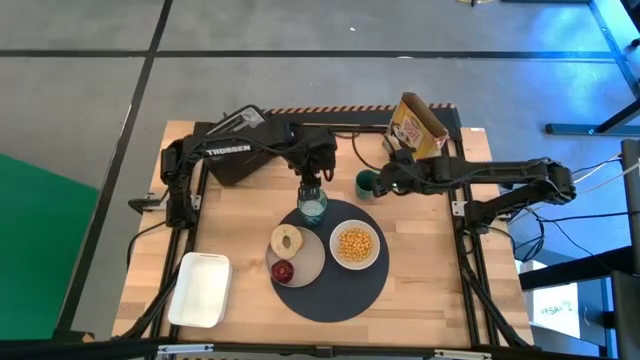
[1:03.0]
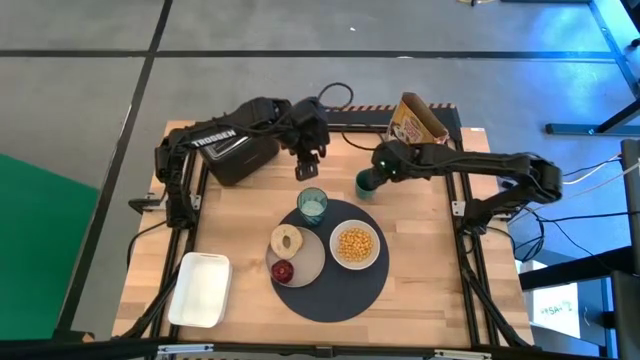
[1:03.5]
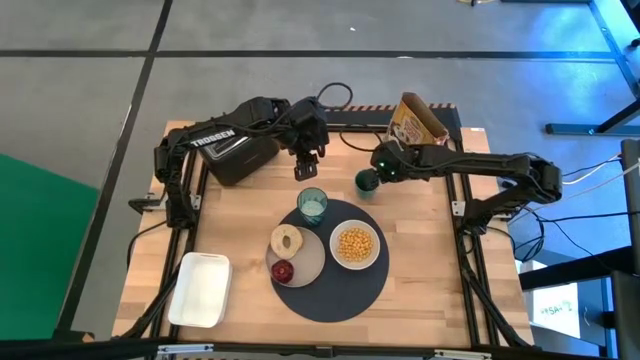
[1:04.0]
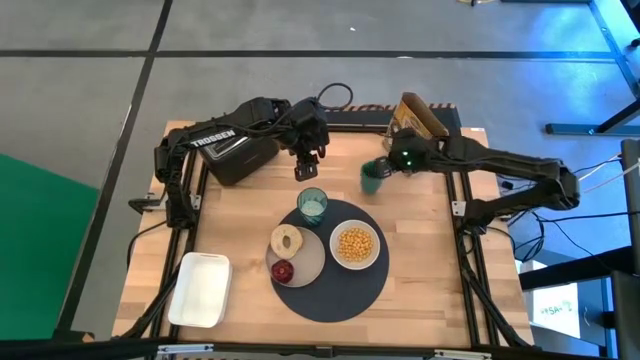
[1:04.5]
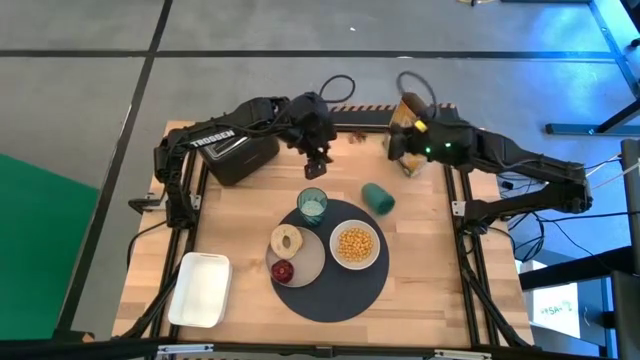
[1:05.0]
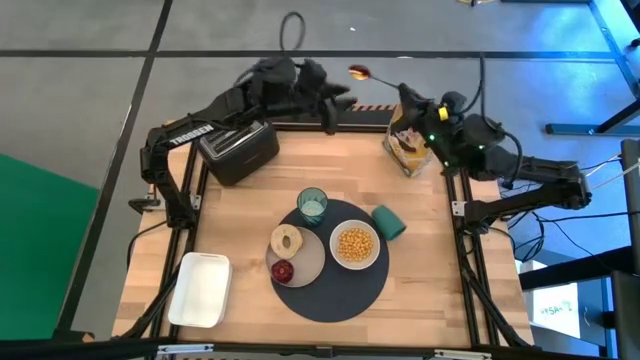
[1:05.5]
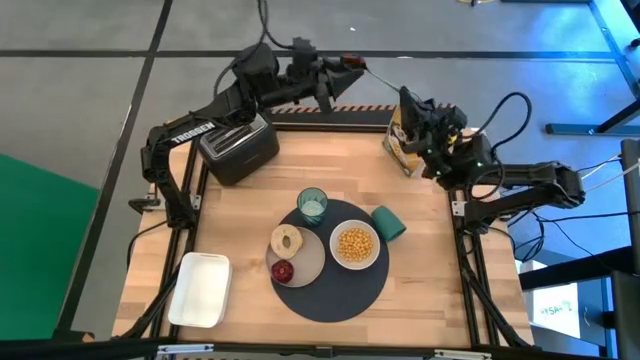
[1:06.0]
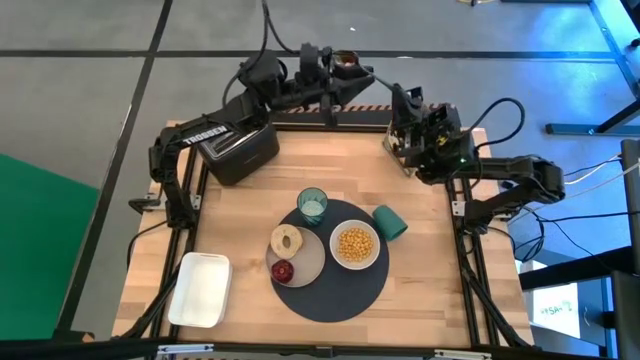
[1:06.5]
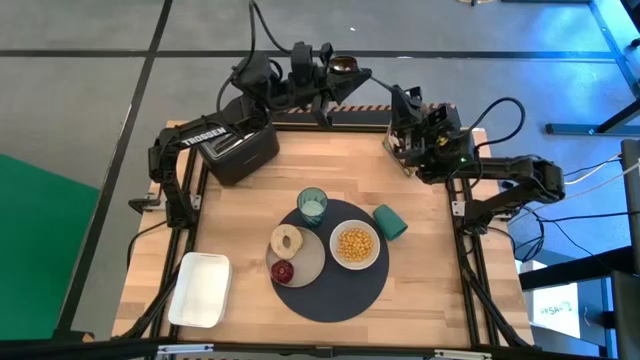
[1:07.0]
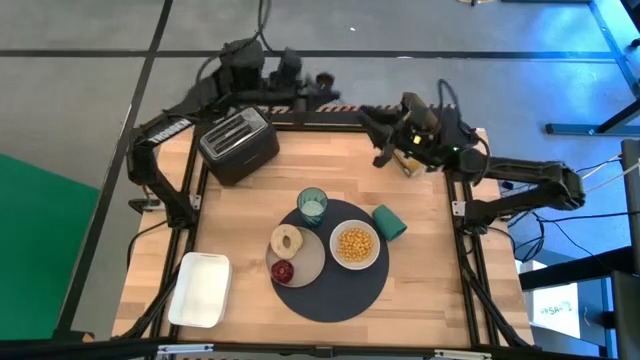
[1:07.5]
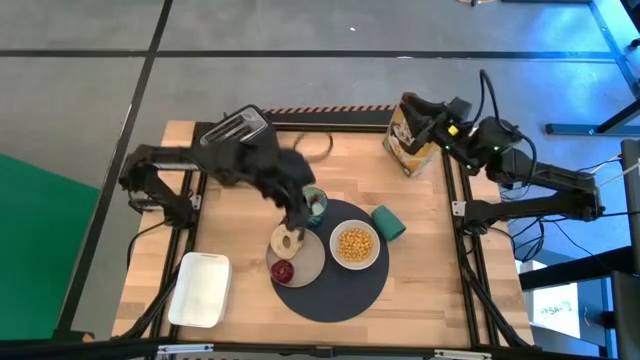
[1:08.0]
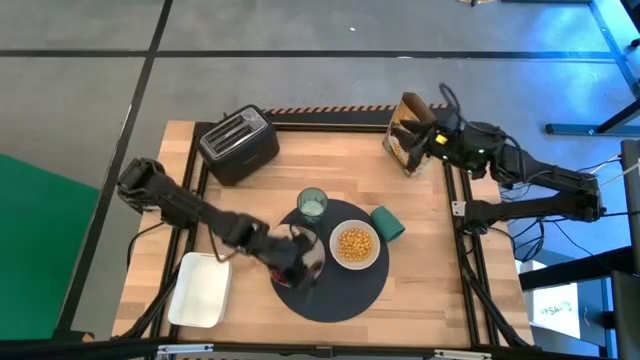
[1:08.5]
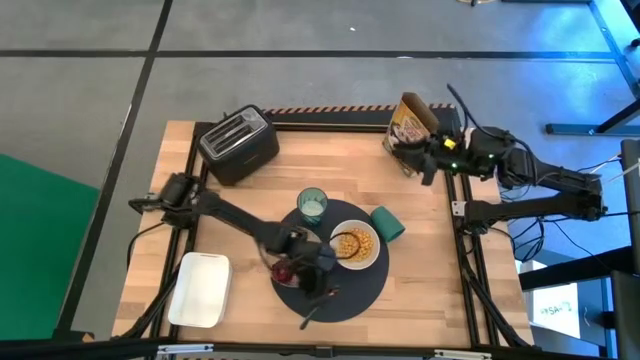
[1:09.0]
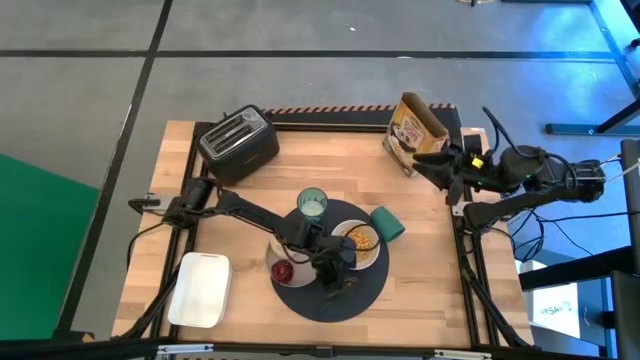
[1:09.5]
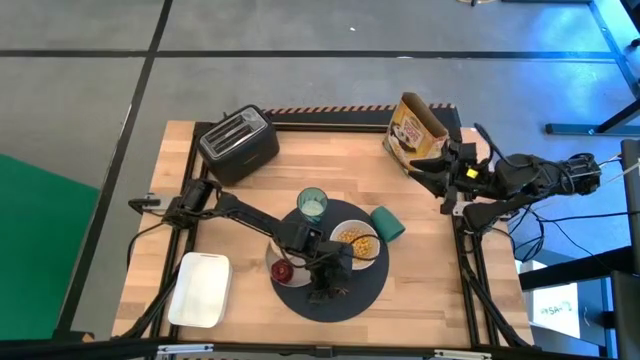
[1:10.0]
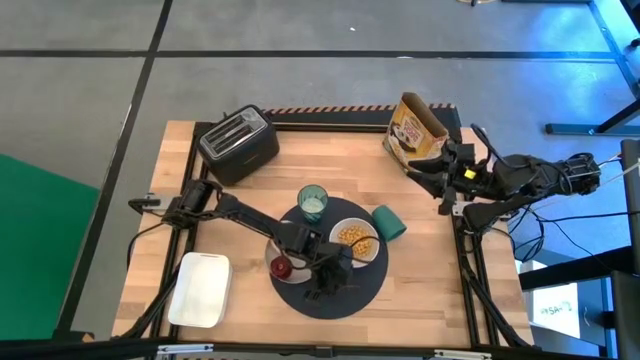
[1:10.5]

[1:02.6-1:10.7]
Task: Arrange a breakfast setting
Put the blue spoon from the blue cup on the dark blue table mat below the white bowl

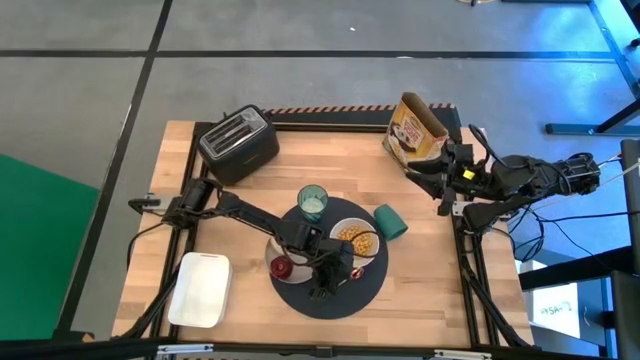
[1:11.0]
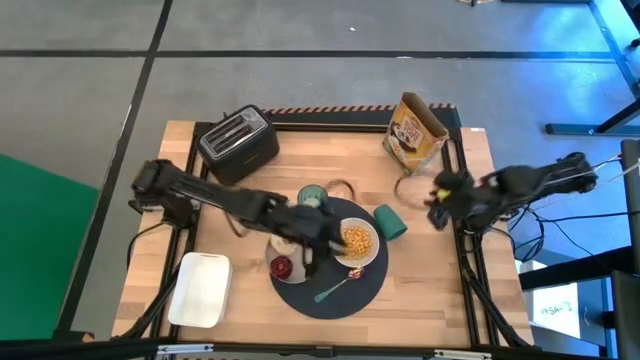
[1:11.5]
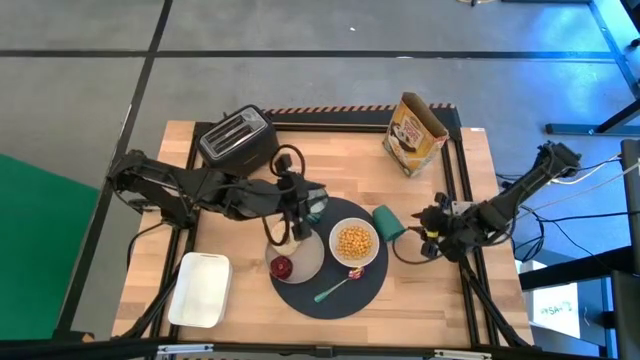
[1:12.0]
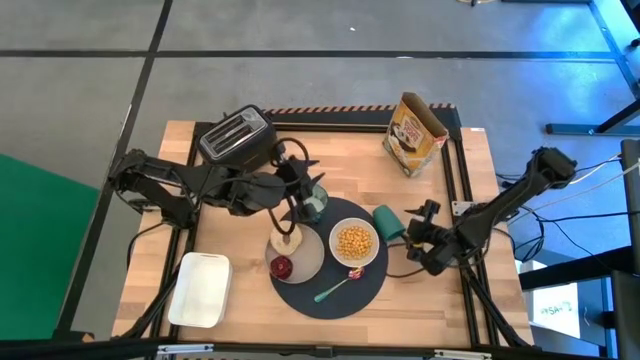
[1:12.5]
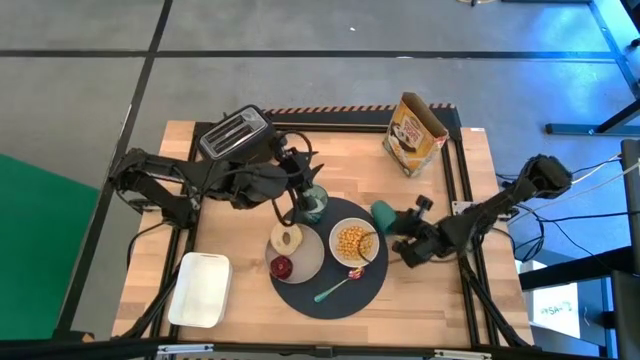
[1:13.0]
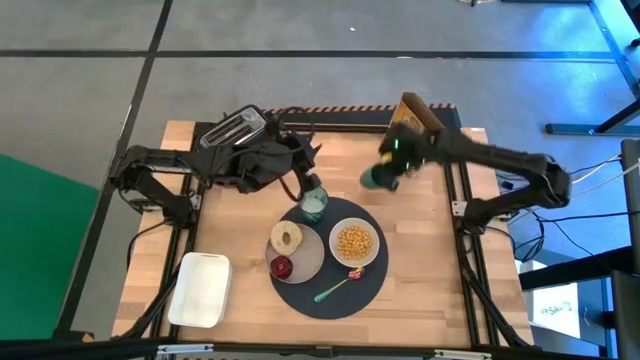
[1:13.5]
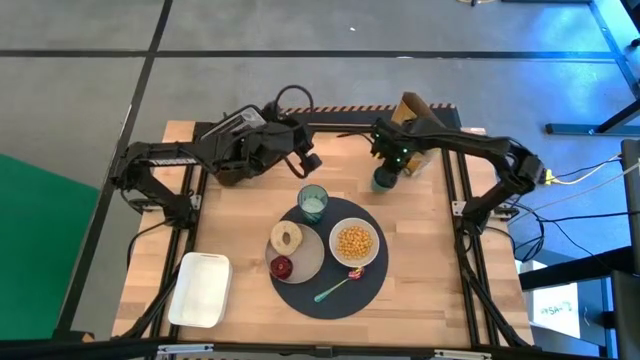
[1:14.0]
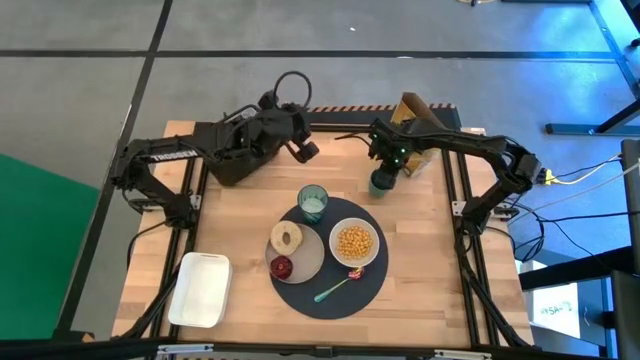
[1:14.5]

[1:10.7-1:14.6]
Adjust the blue cup

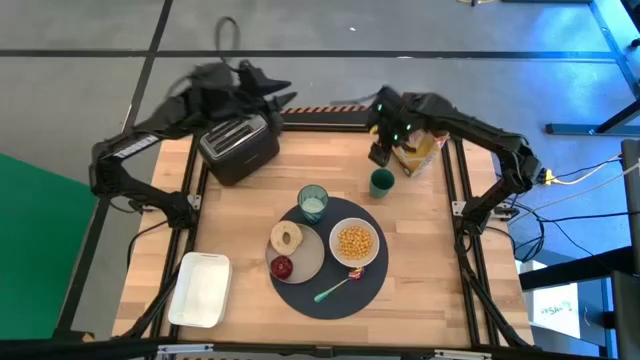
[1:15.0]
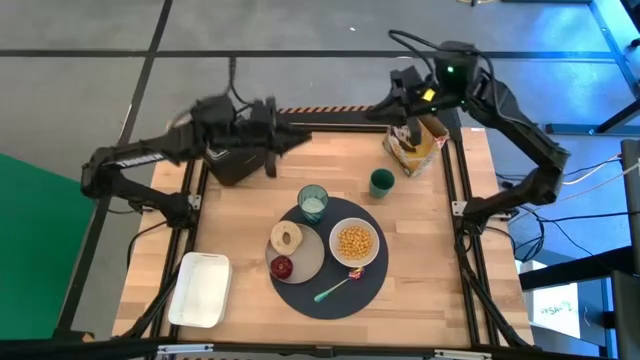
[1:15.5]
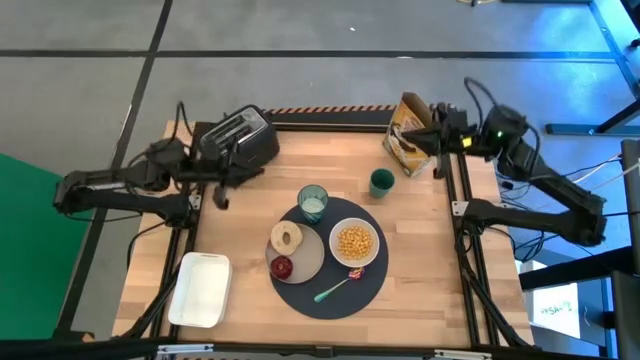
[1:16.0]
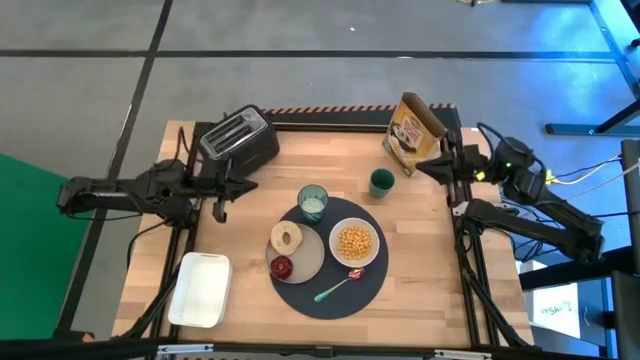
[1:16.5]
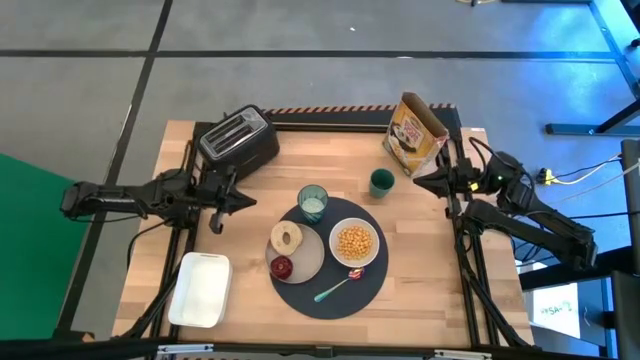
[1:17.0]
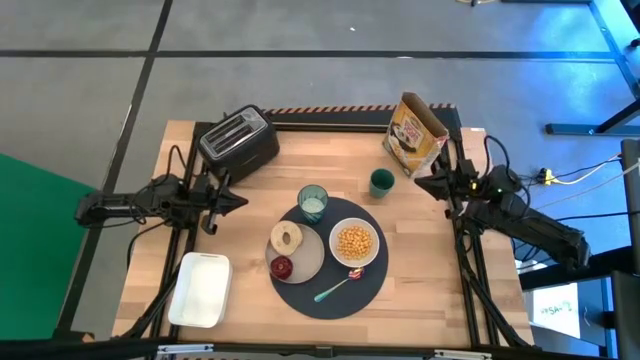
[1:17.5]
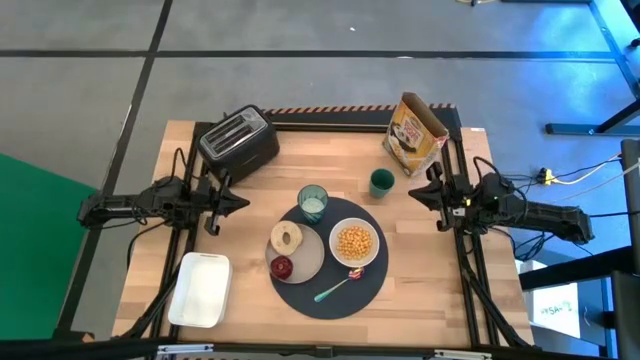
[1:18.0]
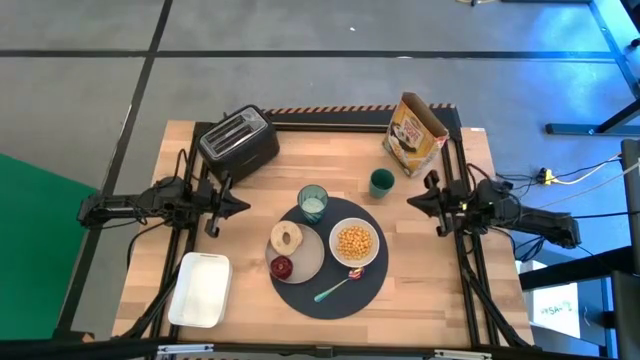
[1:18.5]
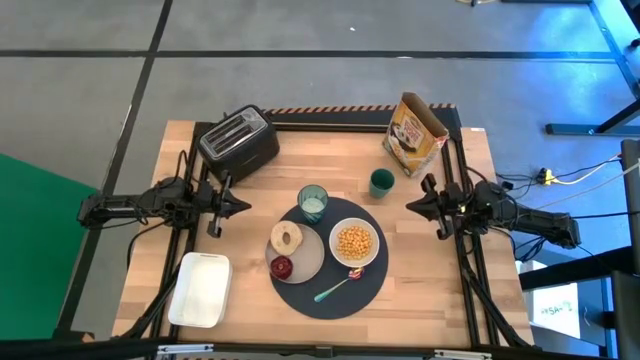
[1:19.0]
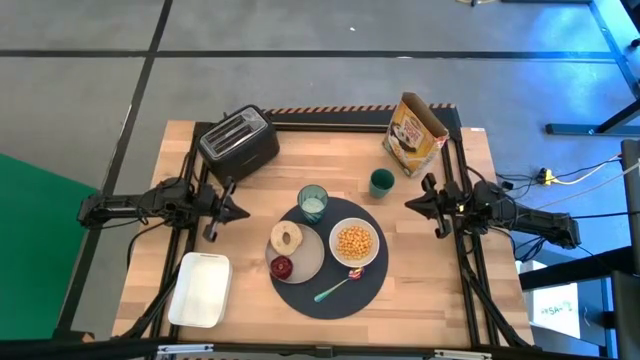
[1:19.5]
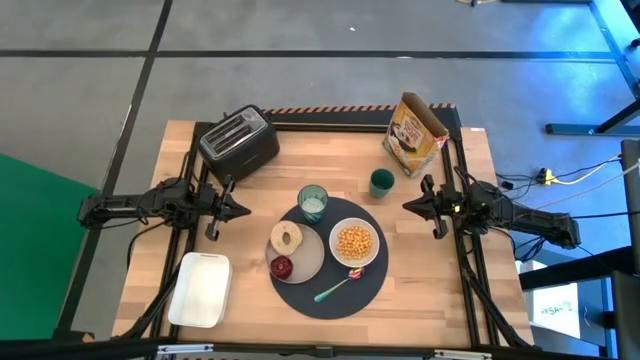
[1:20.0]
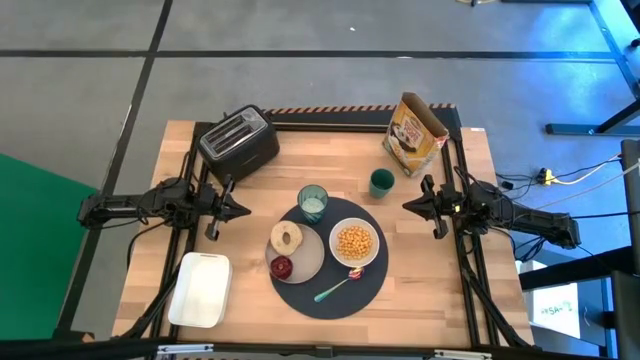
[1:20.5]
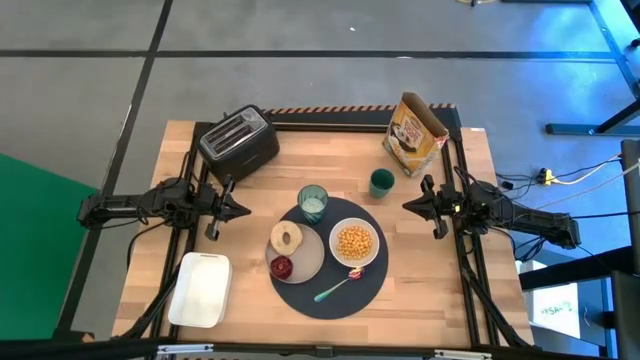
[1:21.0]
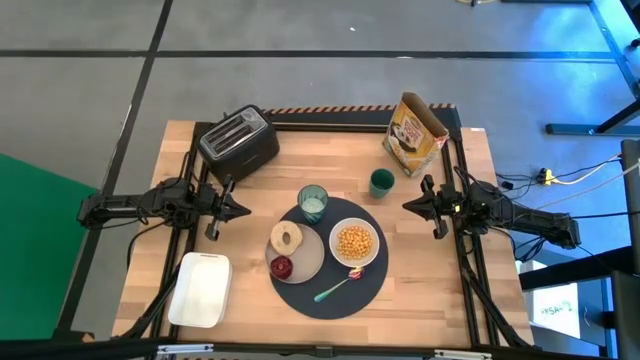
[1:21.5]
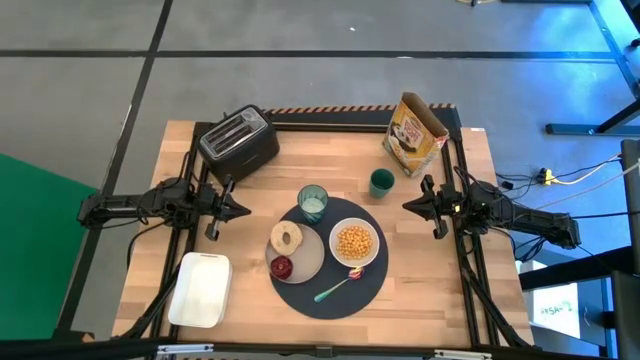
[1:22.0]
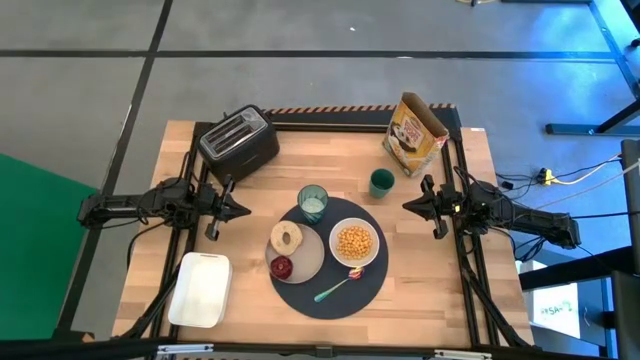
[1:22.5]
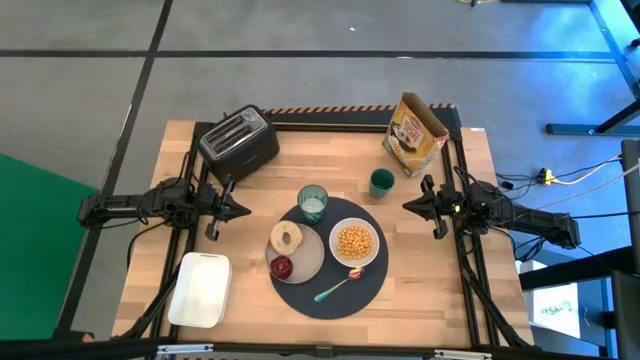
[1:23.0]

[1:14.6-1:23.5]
Return to home position

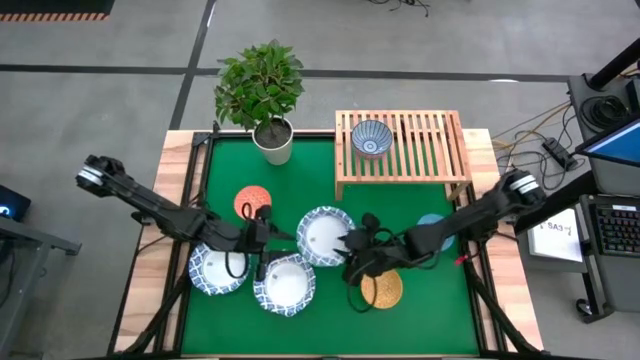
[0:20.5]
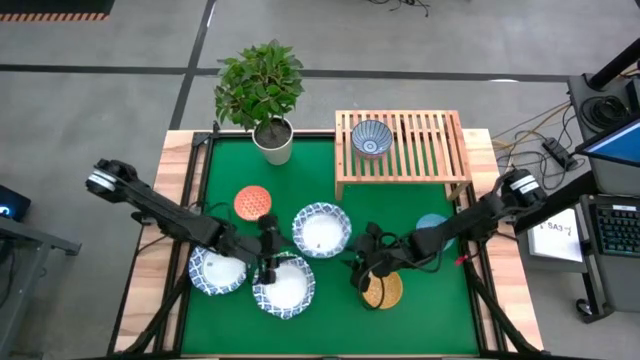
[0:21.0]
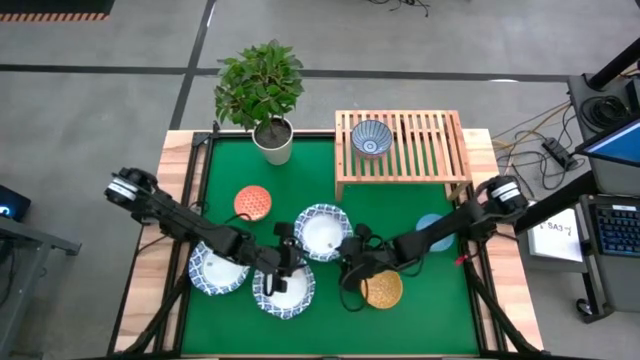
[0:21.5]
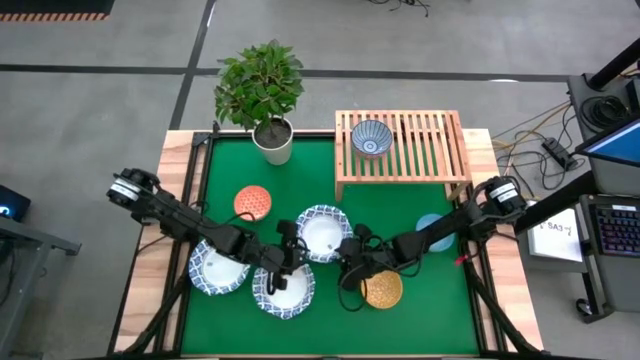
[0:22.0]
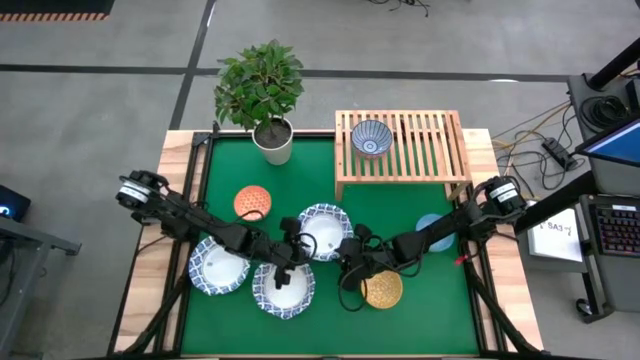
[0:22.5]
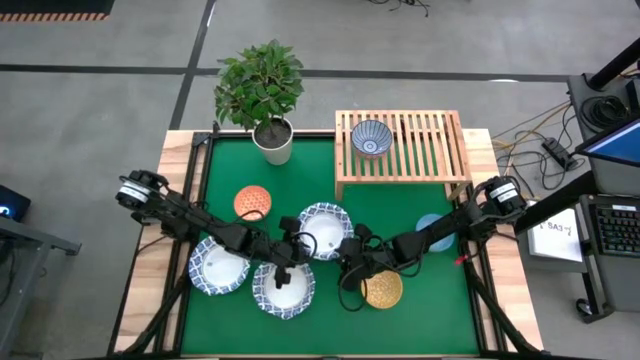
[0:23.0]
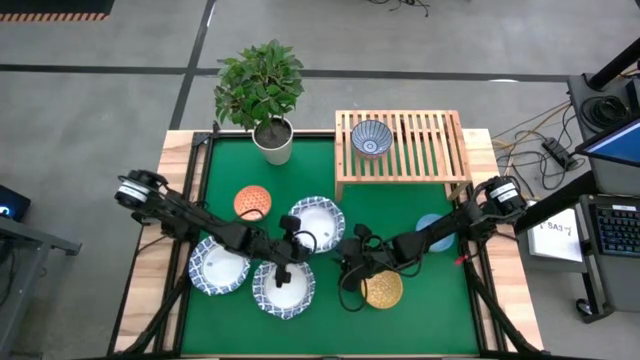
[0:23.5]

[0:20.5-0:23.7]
Task: Place and stack bowls onto a shelf
Put the white patterned bowl on the shelf
